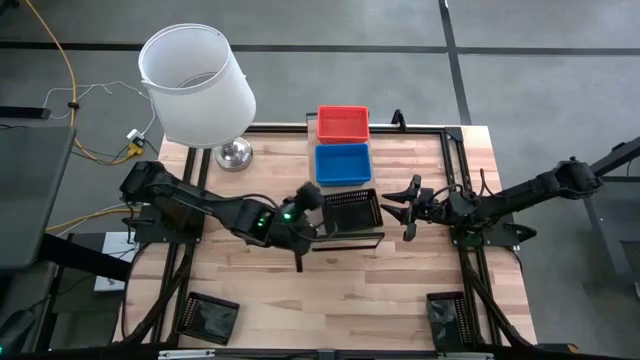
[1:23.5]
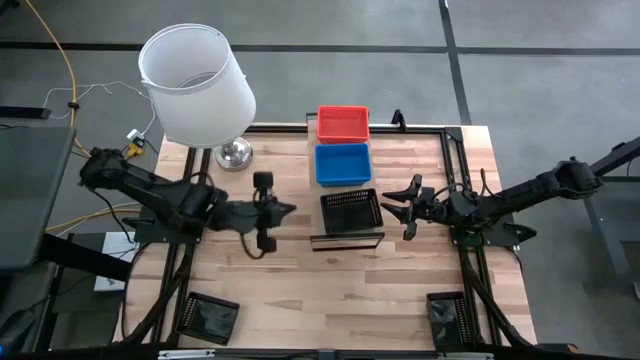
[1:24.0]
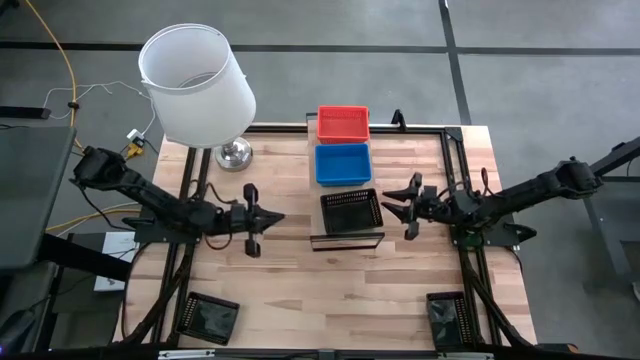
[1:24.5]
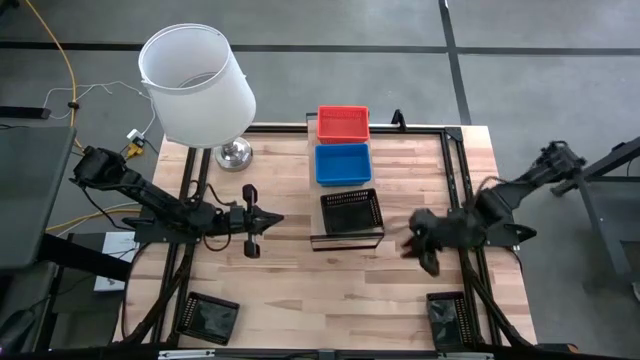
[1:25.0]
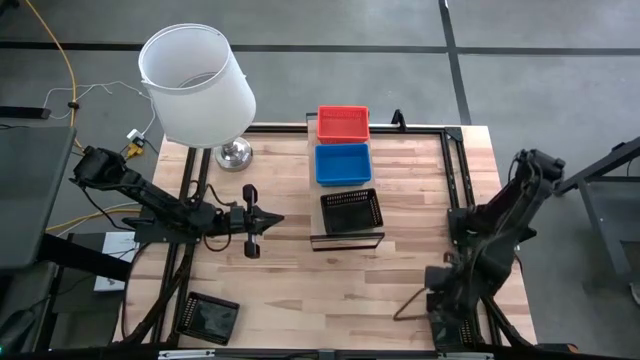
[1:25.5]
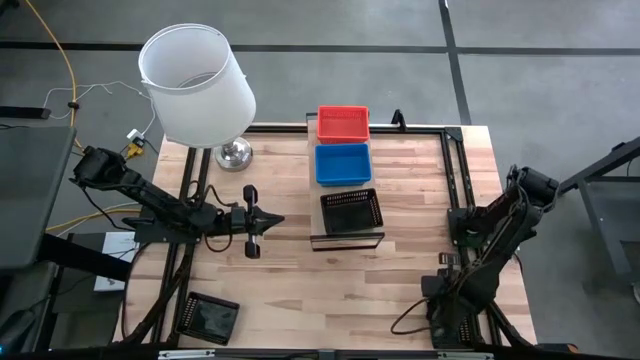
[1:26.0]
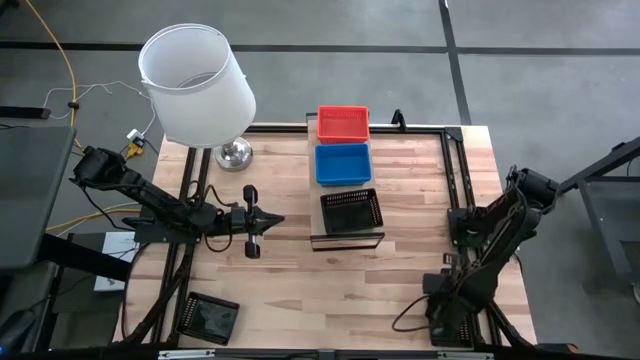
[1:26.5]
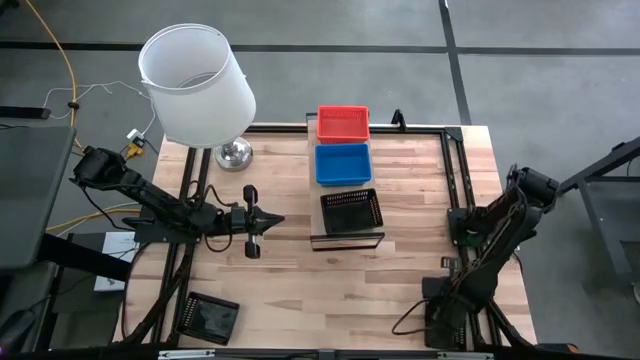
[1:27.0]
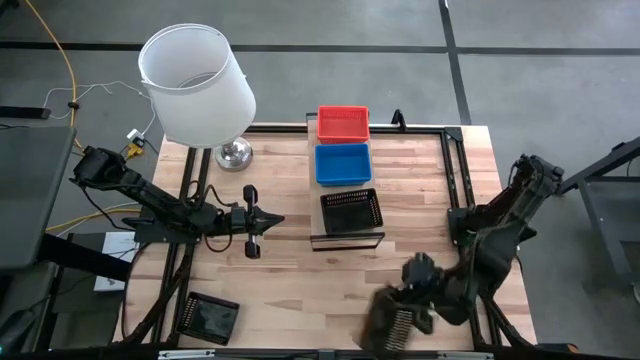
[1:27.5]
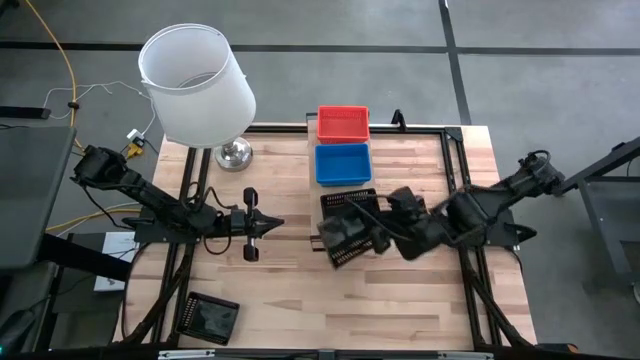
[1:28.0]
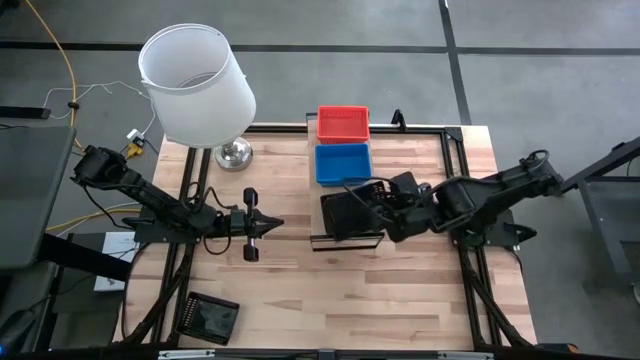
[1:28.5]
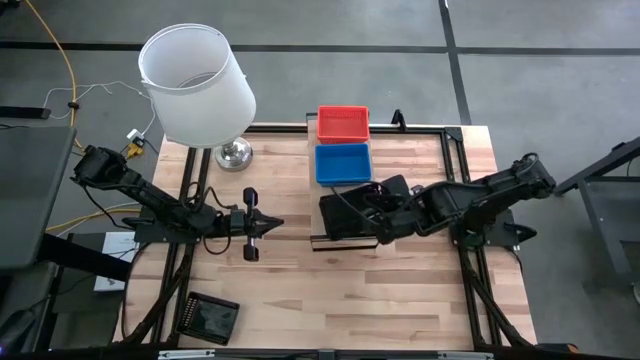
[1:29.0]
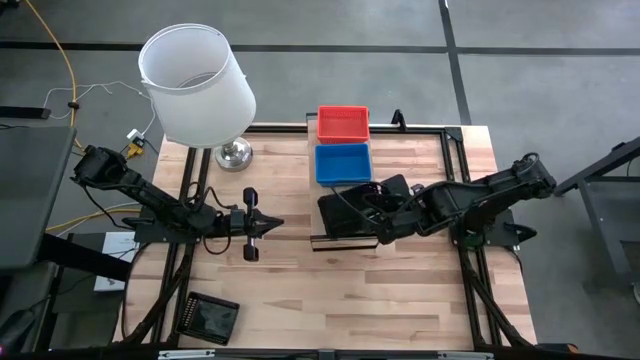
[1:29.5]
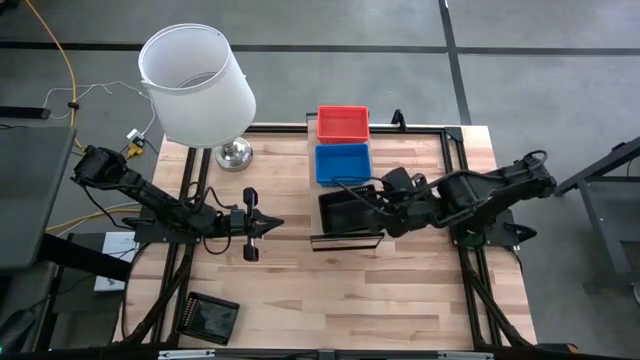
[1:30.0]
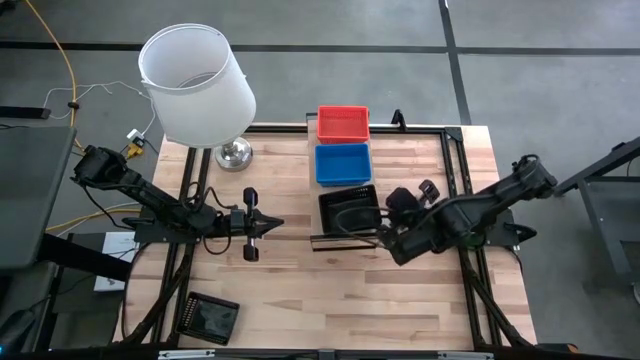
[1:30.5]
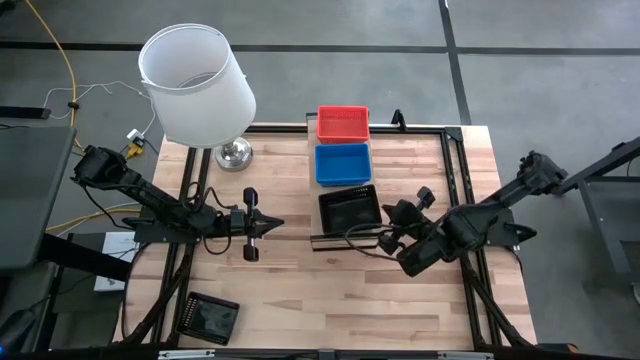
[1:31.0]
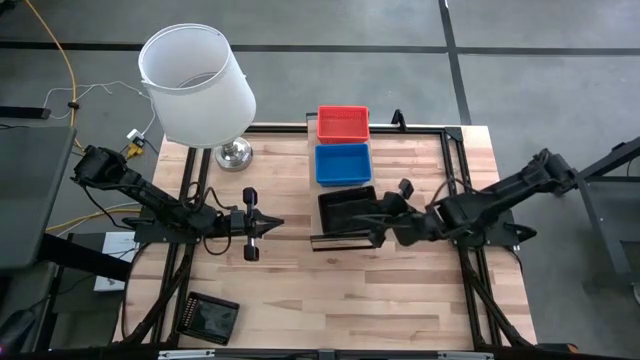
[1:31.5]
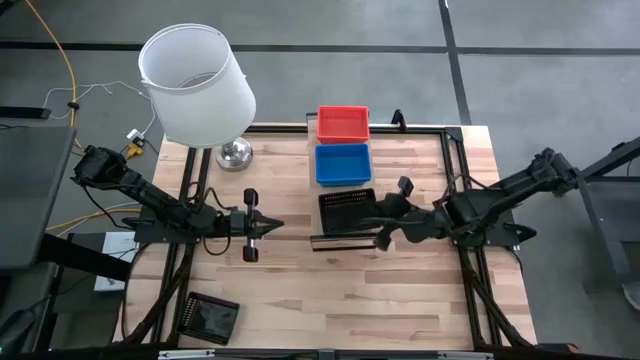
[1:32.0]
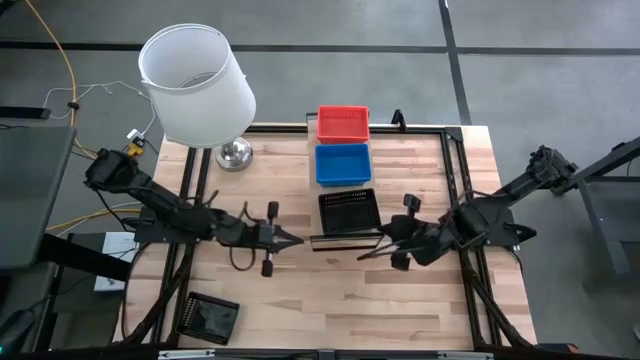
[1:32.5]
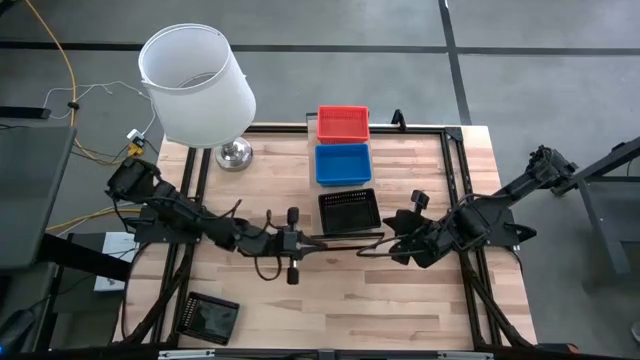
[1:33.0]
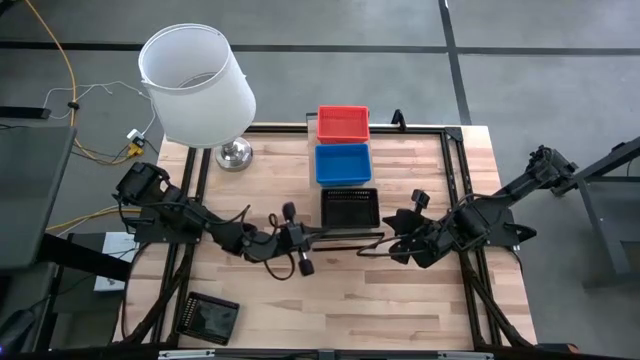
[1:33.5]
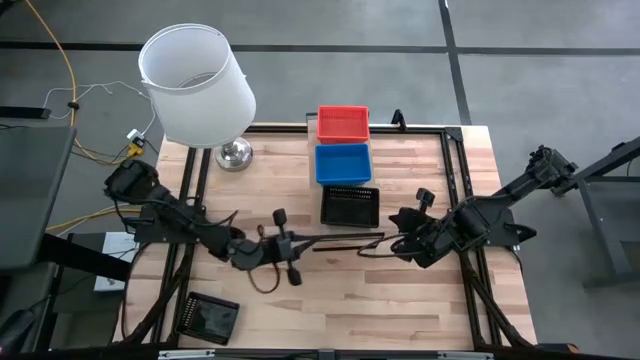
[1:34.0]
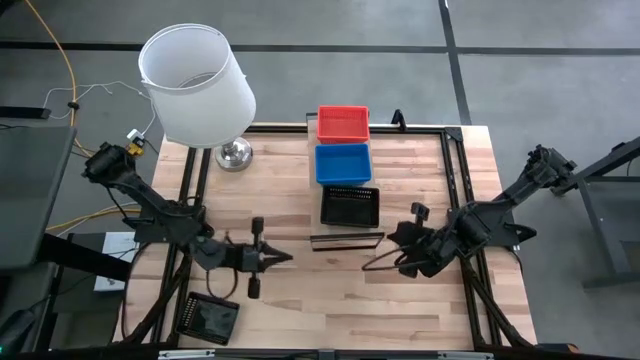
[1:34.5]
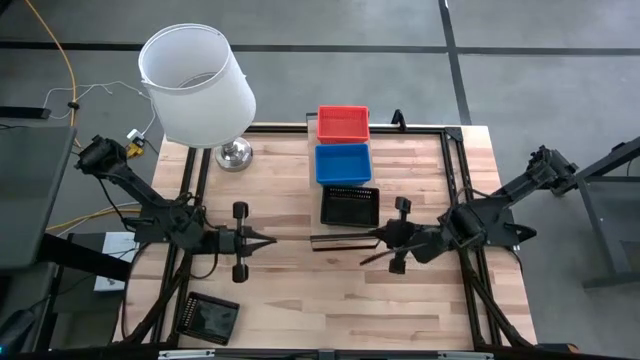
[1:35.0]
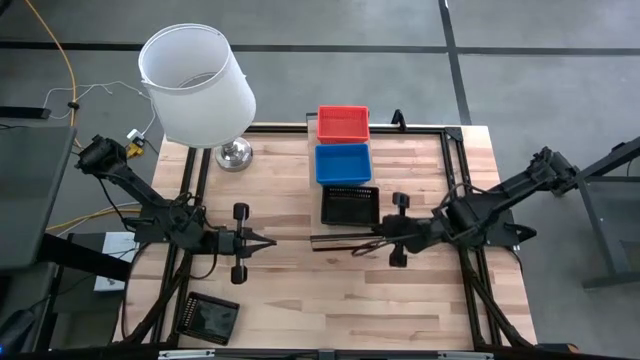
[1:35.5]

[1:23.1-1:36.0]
Task: Stack baskets on shelf by color
Stack the right black bin on top of the black bin on the shelf

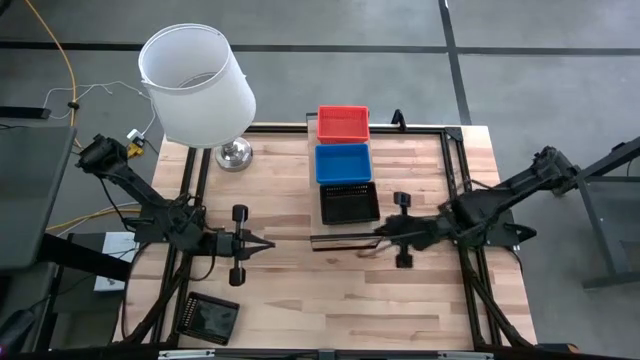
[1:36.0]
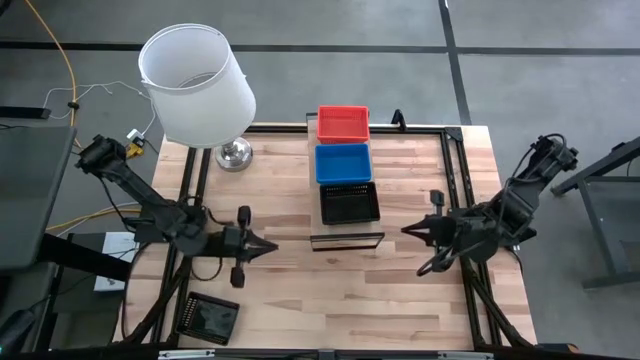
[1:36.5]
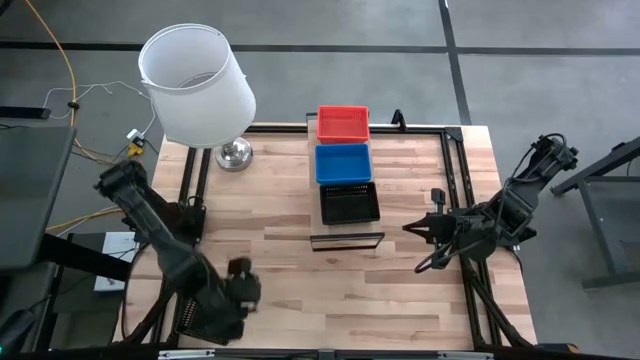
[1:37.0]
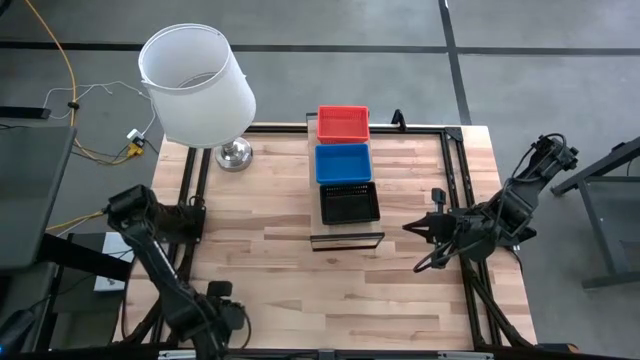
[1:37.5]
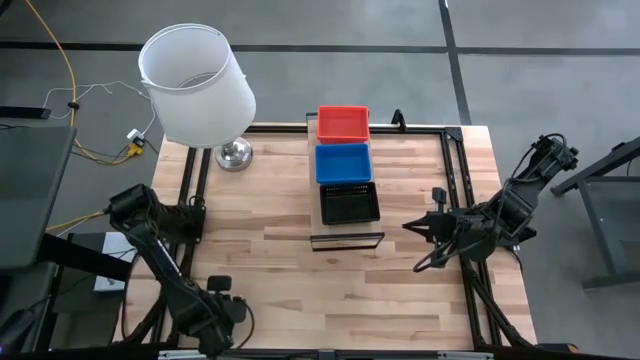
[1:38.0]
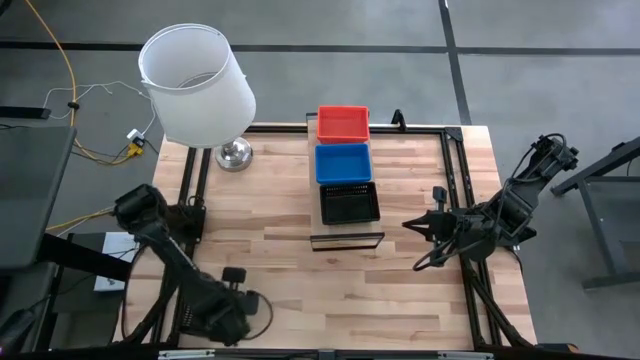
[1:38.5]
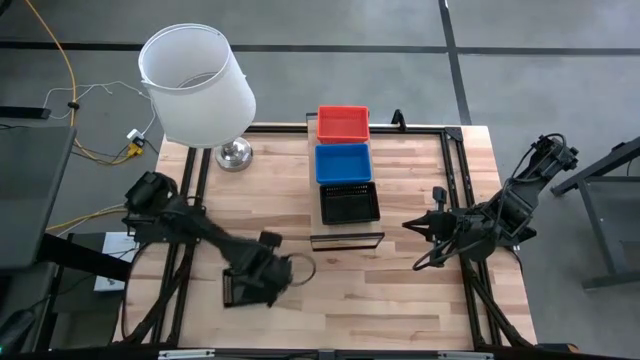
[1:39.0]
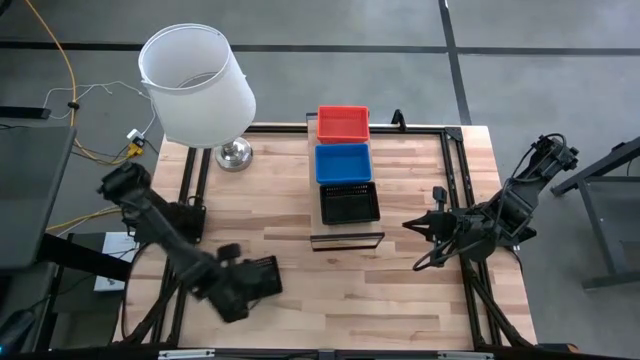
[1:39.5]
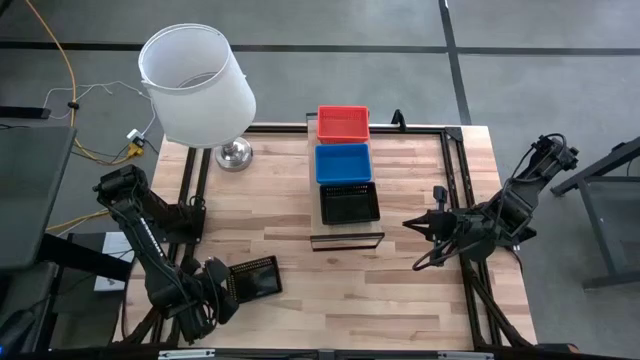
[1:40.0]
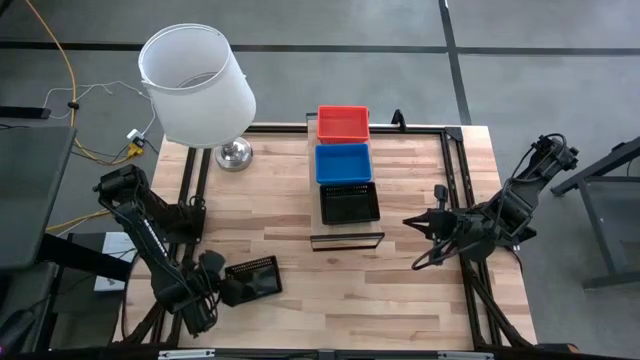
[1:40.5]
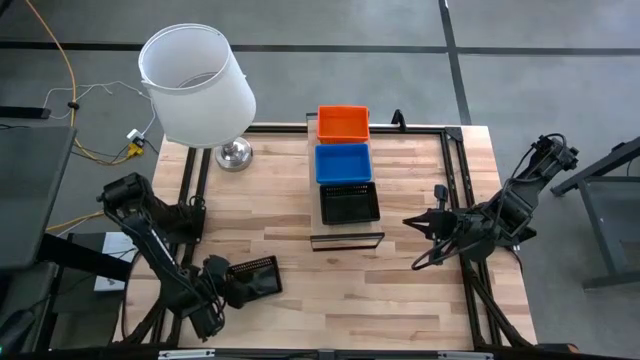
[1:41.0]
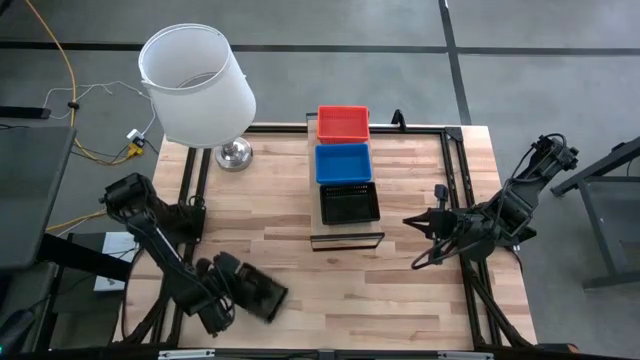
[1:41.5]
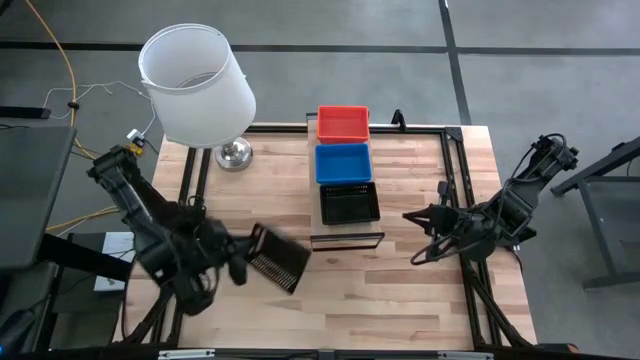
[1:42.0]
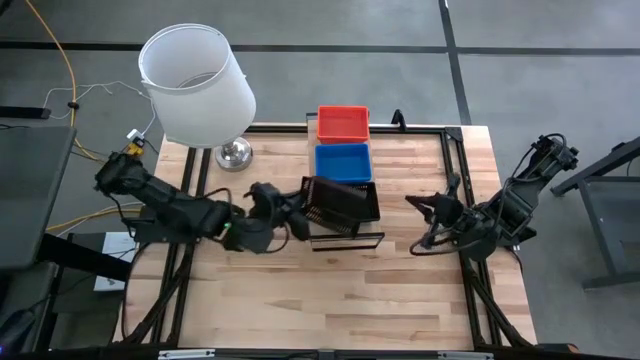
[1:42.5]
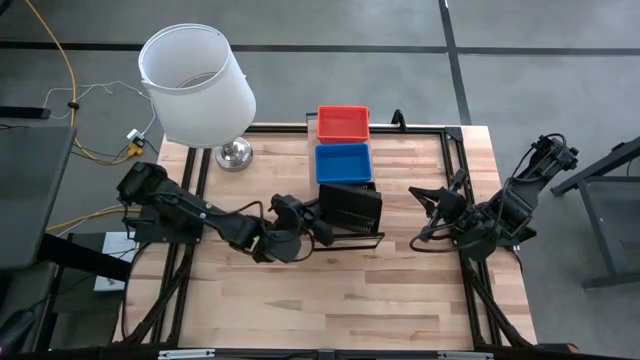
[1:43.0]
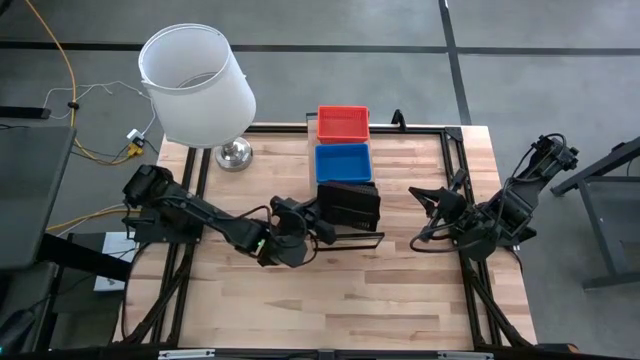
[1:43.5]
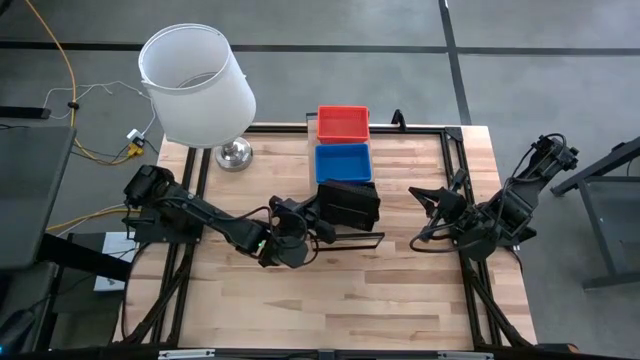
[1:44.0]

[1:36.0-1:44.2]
Stack the black bin on top of the black bin on the shelf

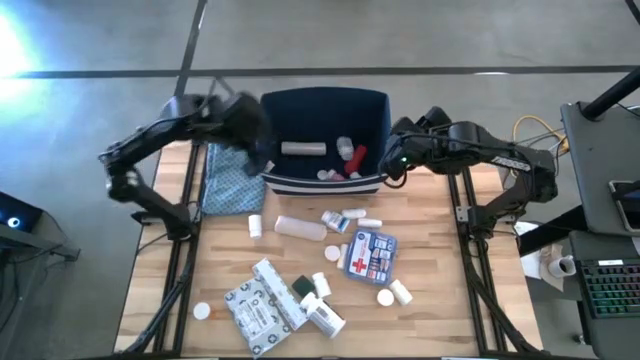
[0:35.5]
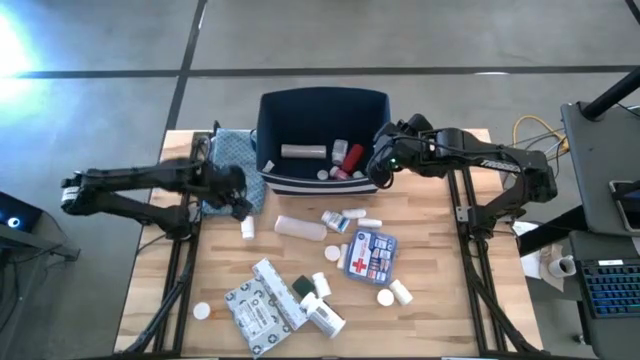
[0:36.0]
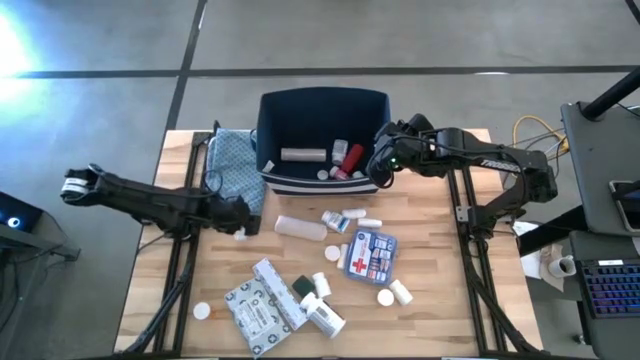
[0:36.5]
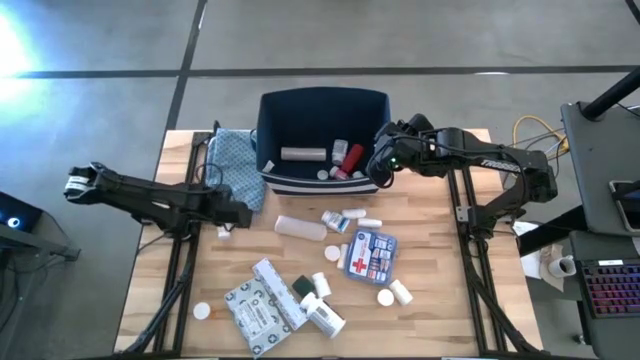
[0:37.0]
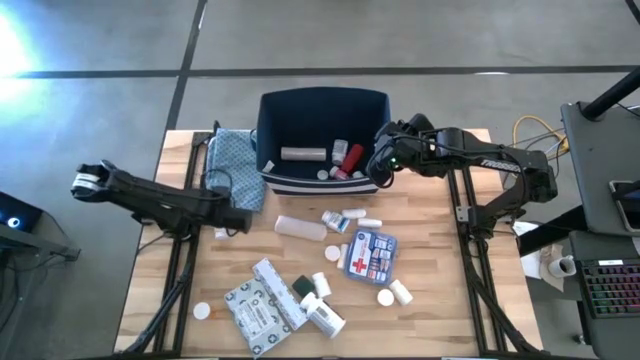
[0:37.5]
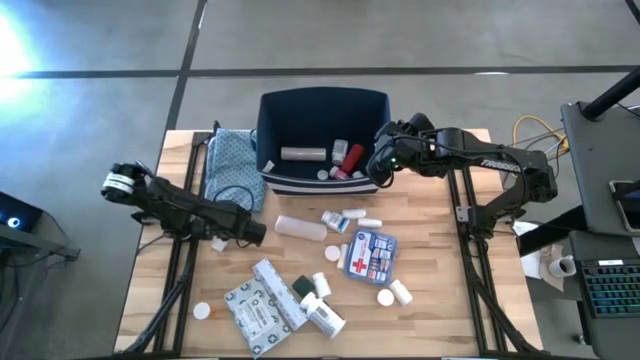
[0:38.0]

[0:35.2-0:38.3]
Task: Pick & place medical supplies in basket/bin
Put the white pill bottle into the blue bin
